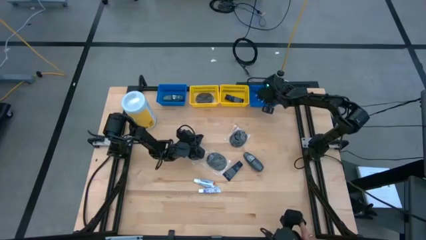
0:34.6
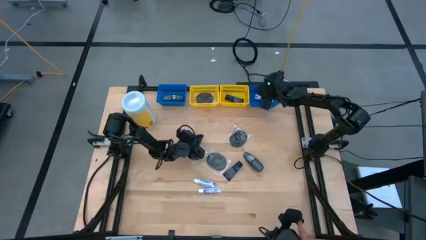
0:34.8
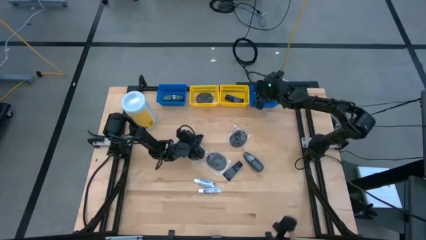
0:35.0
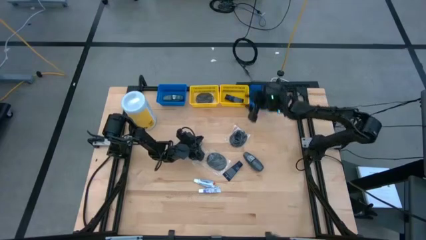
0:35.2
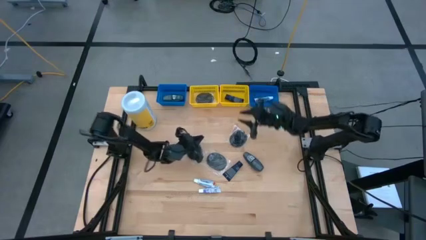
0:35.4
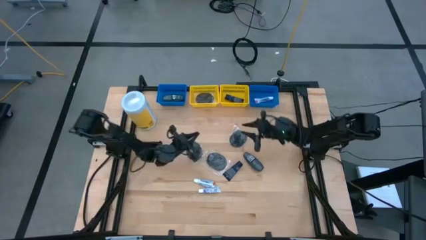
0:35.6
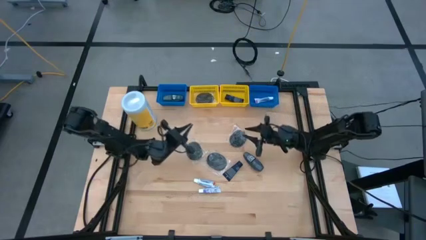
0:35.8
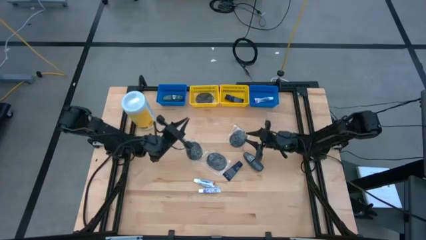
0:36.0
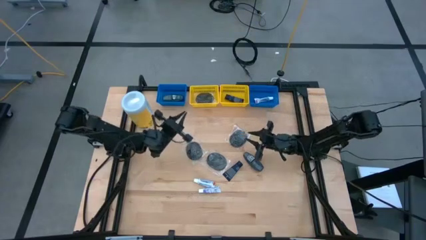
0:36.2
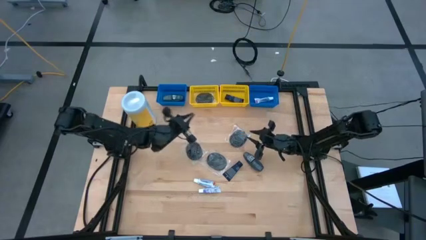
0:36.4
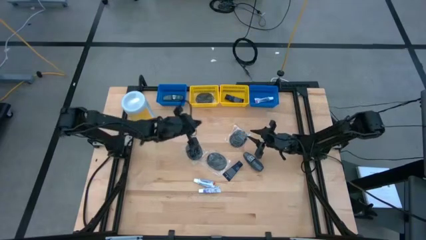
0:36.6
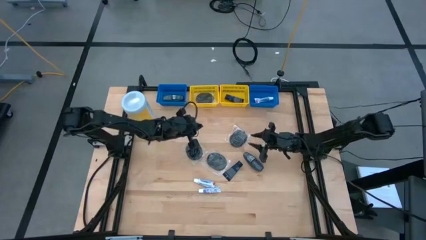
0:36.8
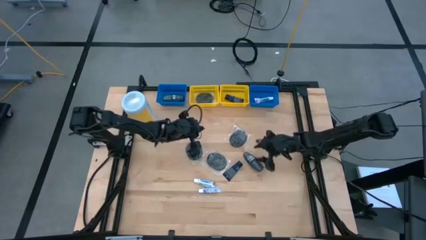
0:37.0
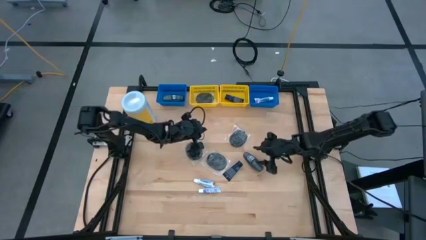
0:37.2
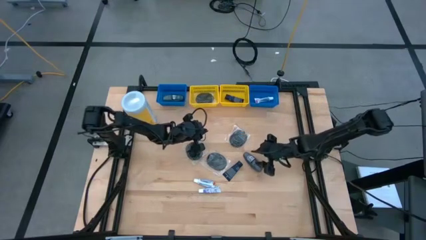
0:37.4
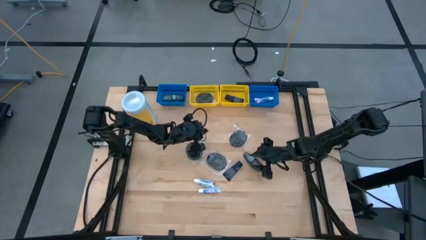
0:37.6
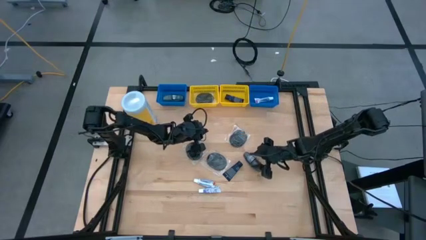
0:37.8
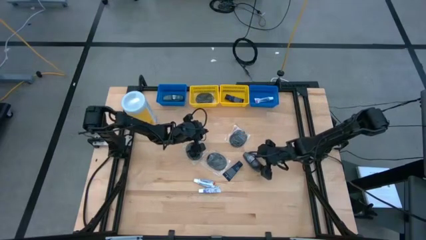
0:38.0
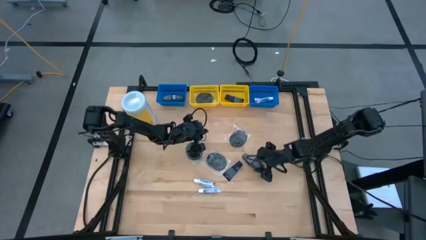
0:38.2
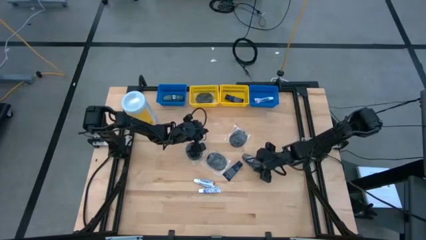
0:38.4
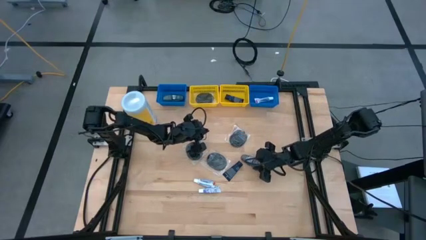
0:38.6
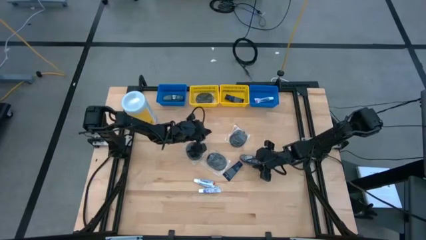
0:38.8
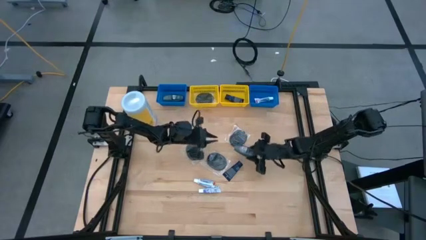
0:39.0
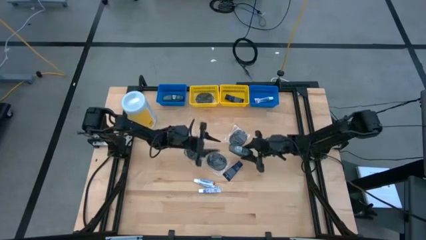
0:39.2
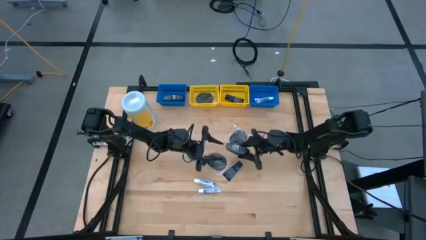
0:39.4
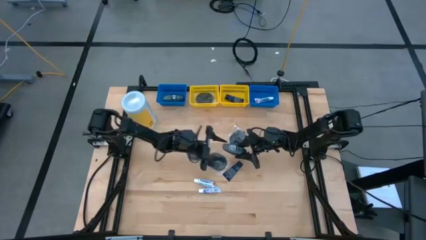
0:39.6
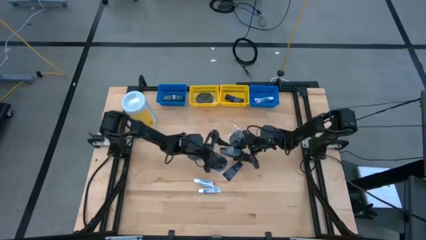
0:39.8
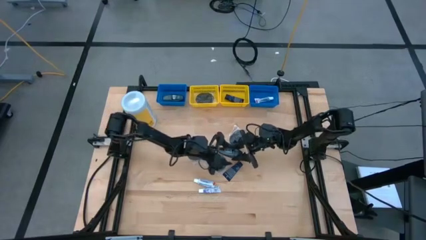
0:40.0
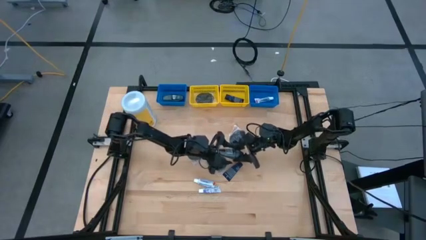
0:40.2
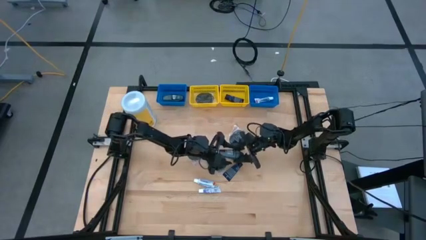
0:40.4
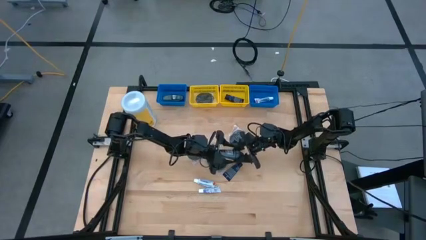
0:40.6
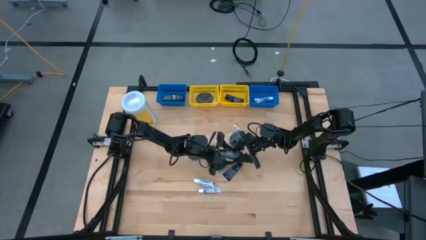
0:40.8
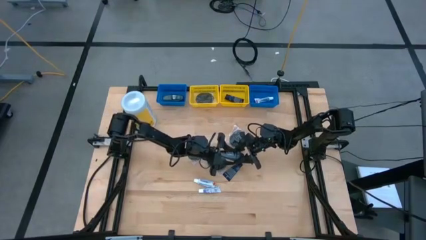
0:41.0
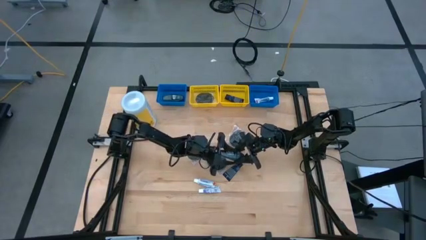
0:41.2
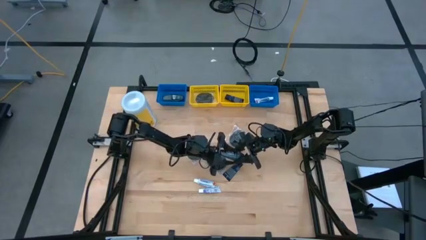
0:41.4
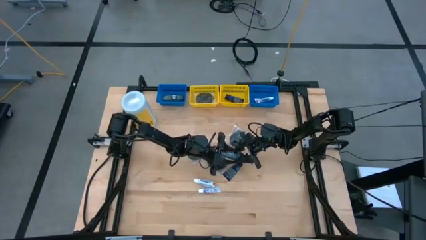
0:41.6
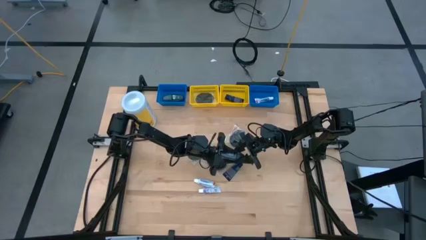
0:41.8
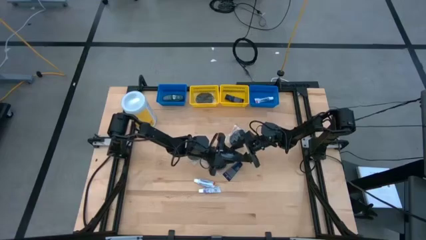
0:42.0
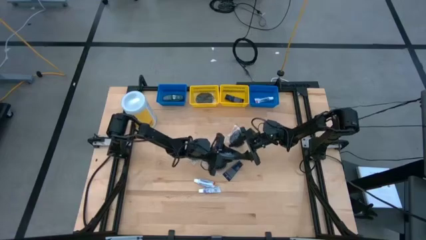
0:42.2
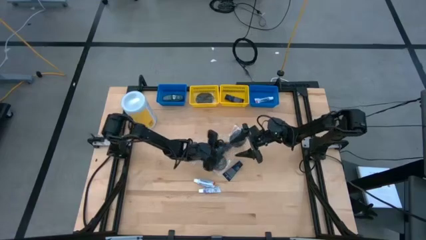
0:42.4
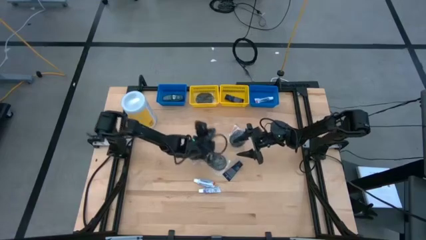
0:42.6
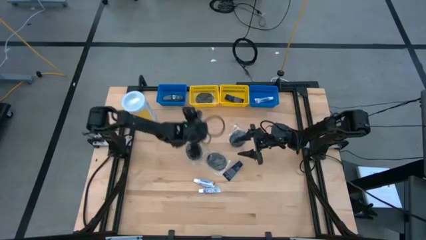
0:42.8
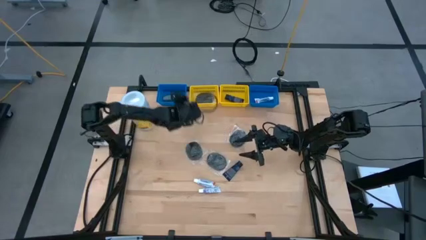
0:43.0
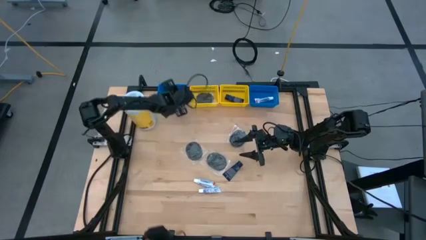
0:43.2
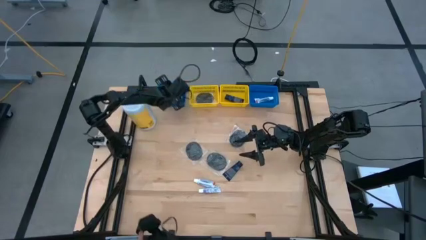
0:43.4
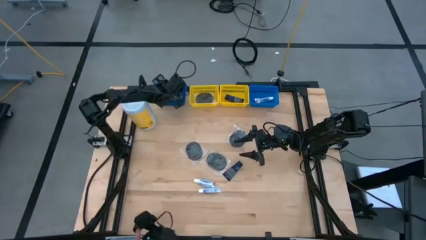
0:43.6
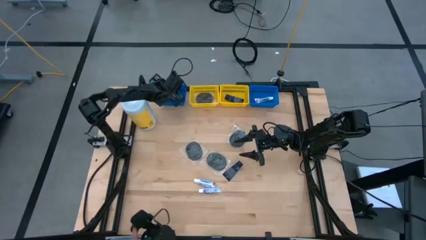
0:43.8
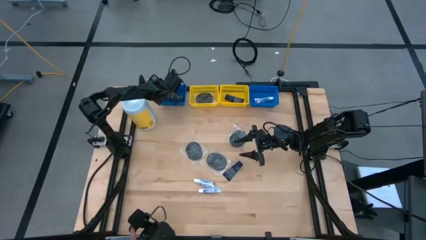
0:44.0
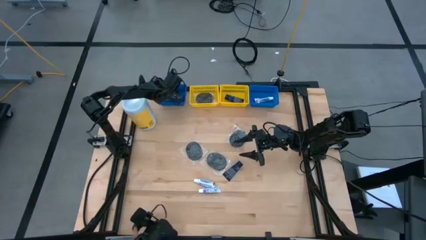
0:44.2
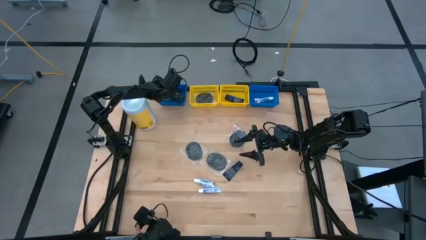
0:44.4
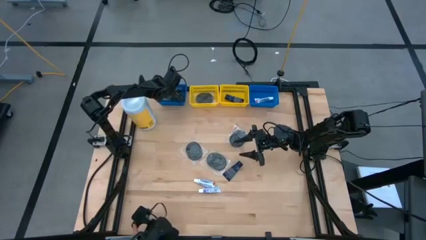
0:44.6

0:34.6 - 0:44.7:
Task: Pick & Place Travel size toiletries
Put the deodorant into the left blue bin

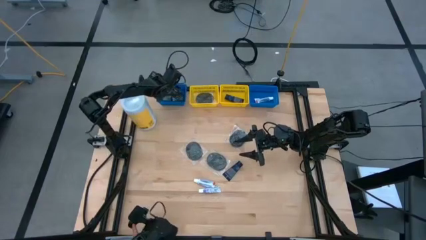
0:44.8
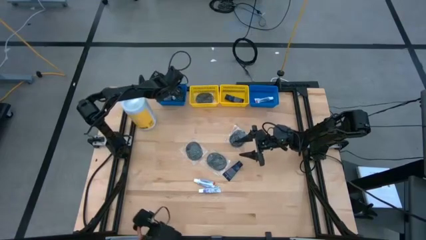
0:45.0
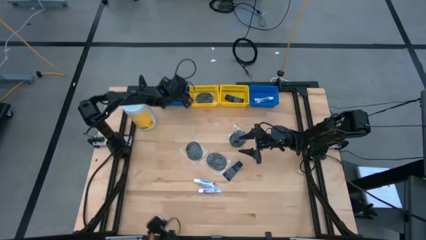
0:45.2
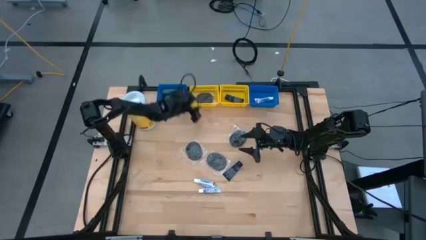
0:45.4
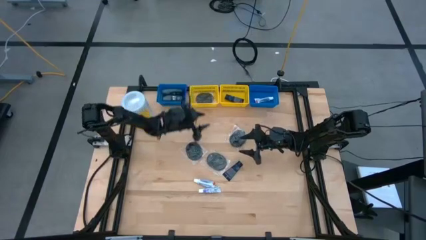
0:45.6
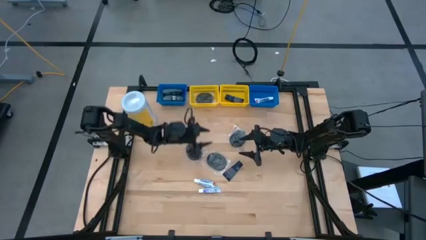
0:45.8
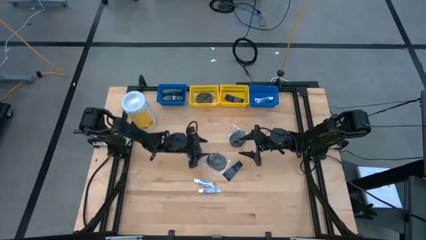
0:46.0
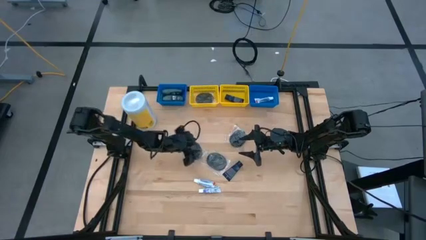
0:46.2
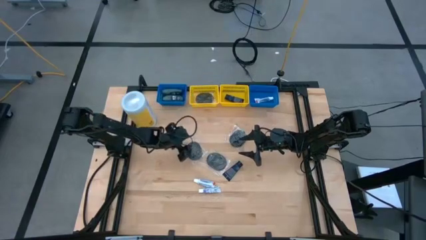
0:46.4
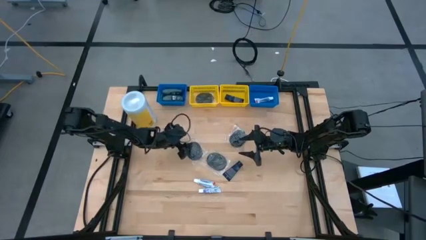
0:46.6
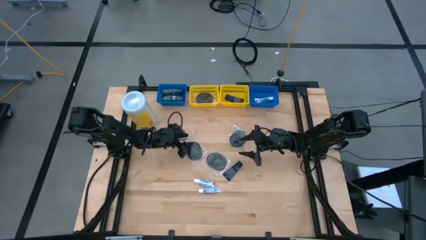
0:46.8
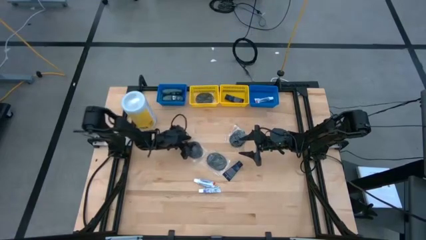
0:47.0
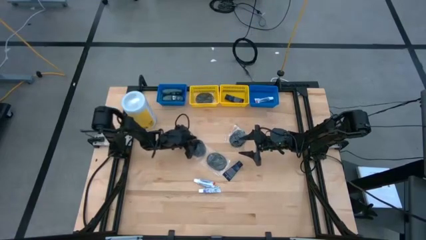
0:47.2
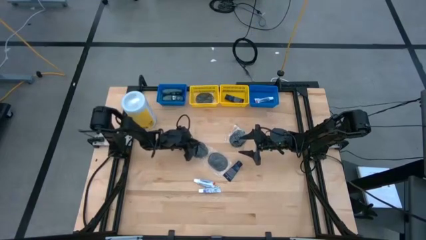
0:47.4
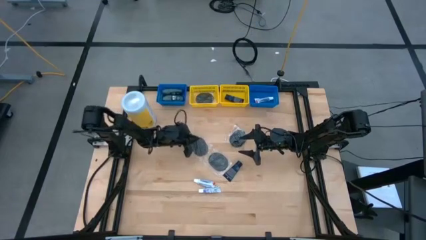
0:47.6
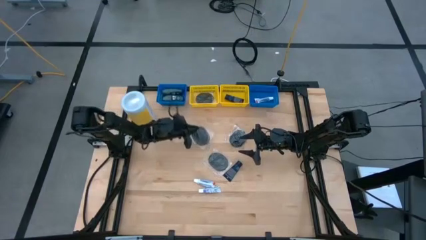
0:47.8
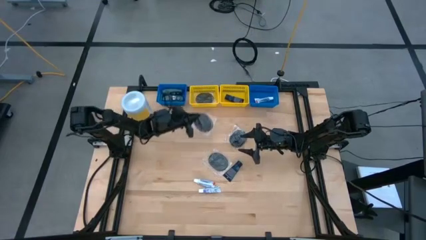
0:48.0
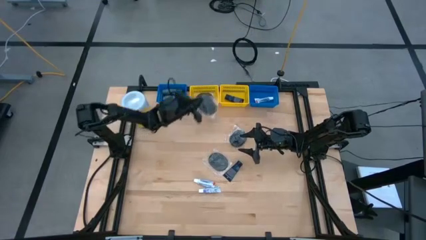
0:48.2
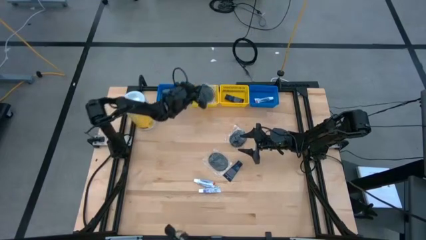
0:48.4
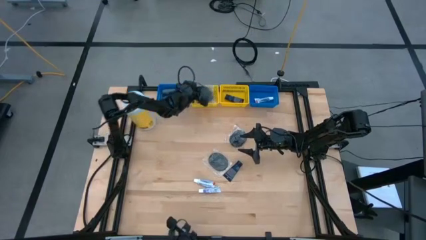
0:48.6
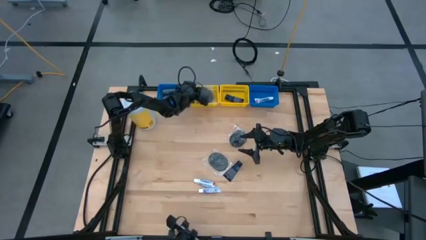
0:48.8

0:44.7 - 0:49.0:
Put the hairbrush into the left yellow bin
